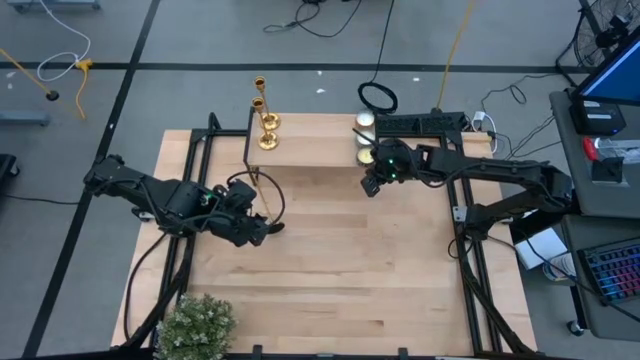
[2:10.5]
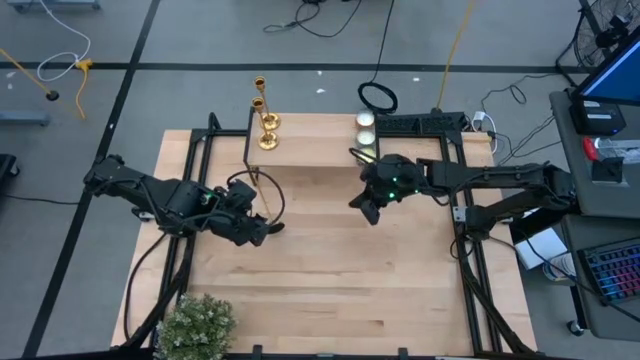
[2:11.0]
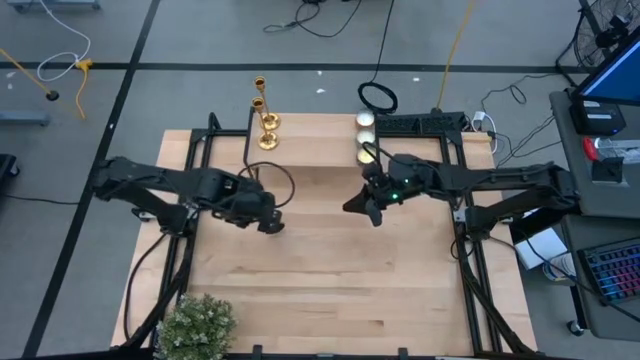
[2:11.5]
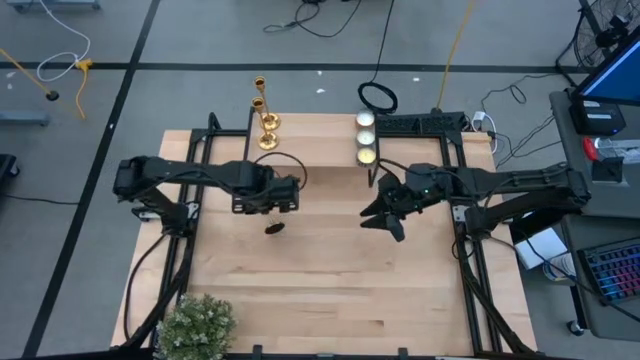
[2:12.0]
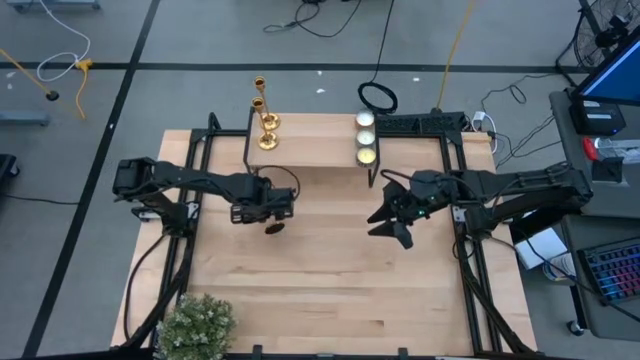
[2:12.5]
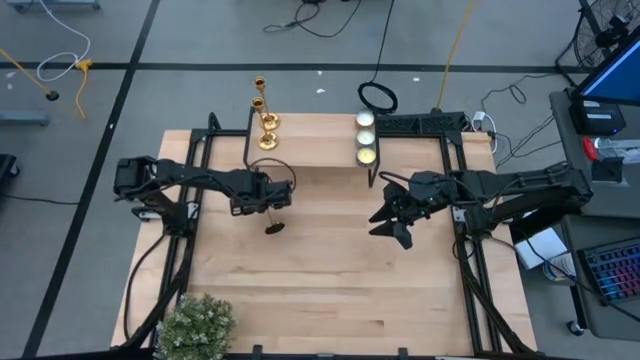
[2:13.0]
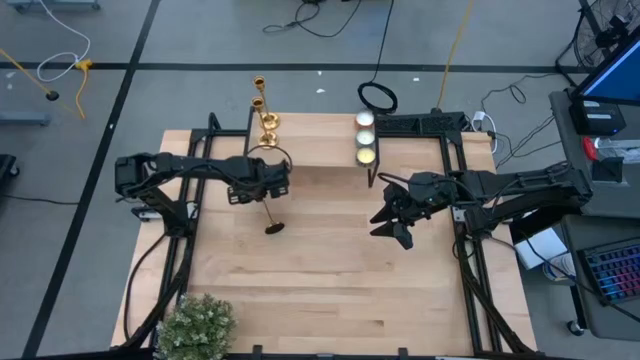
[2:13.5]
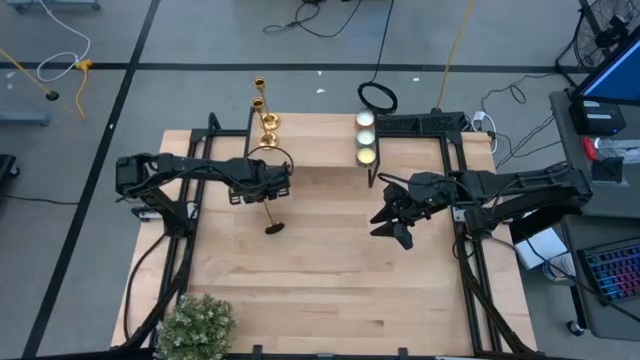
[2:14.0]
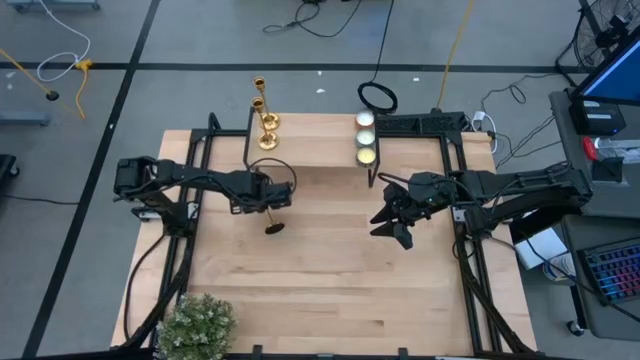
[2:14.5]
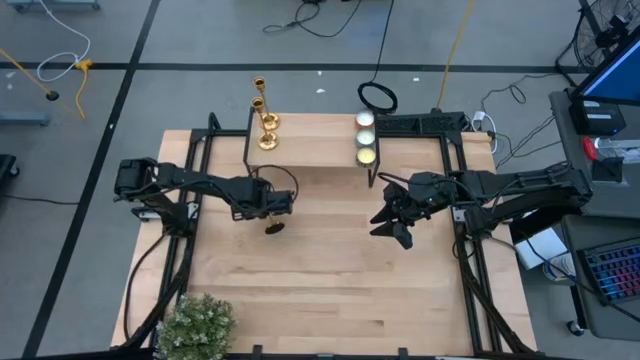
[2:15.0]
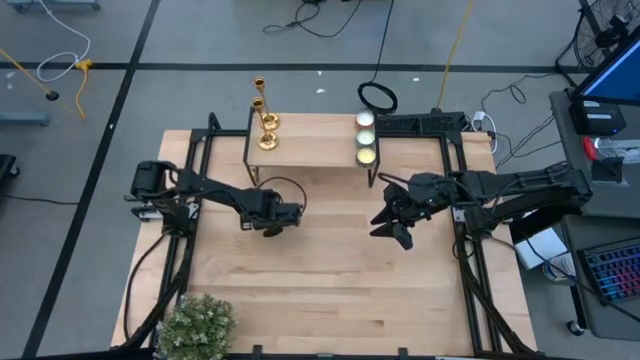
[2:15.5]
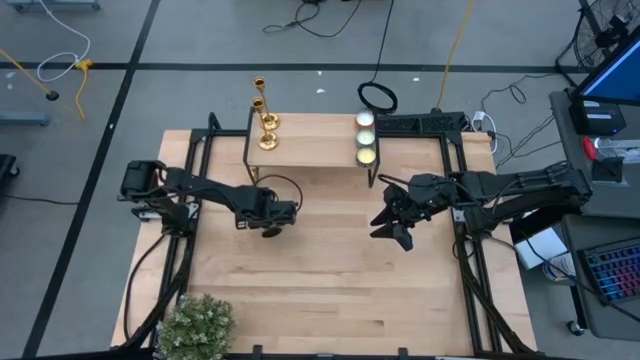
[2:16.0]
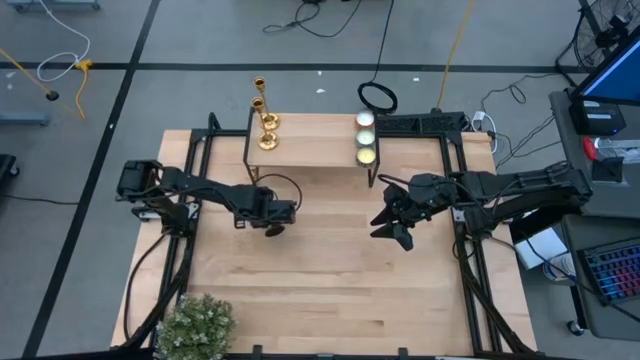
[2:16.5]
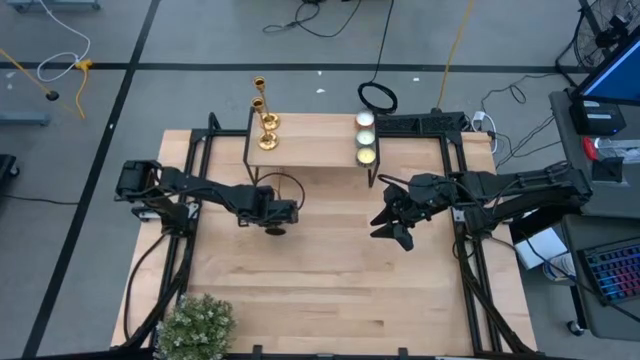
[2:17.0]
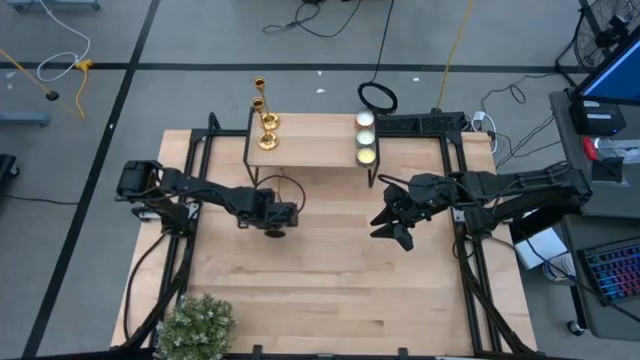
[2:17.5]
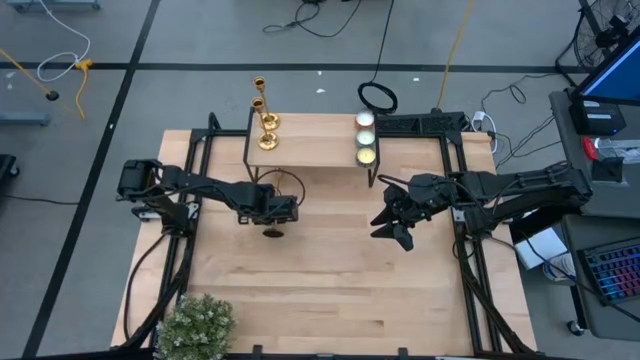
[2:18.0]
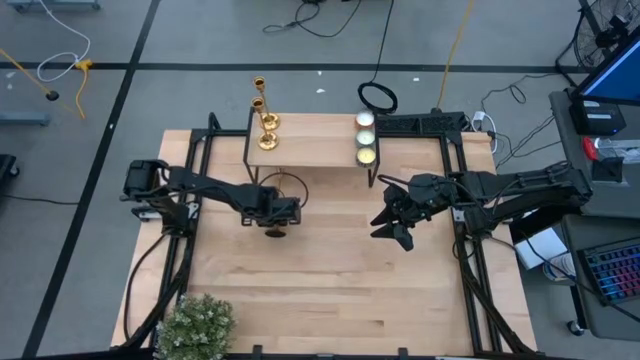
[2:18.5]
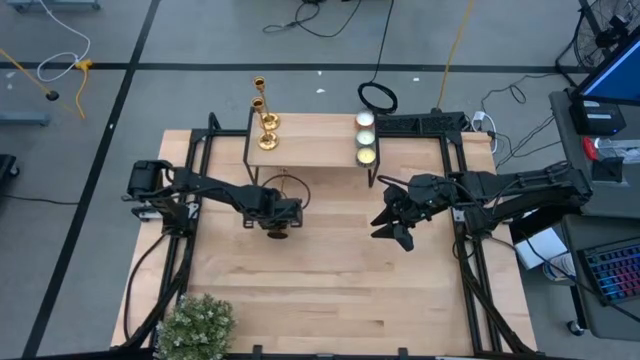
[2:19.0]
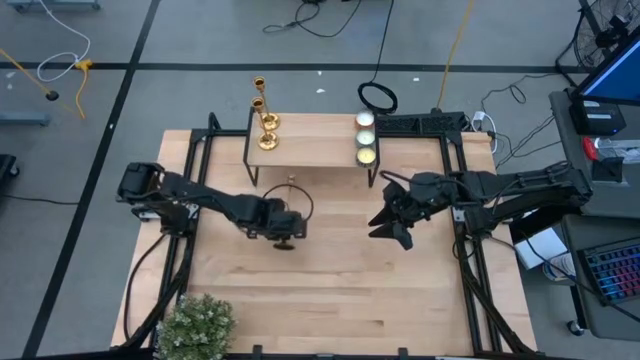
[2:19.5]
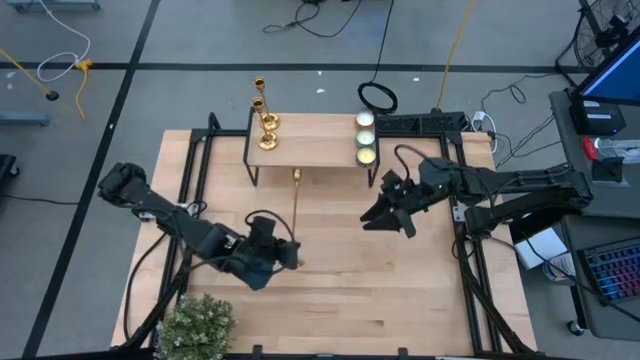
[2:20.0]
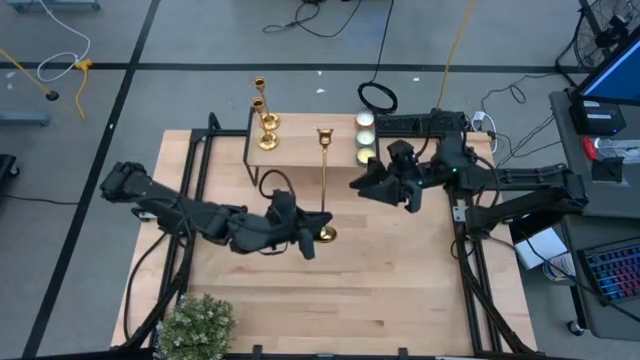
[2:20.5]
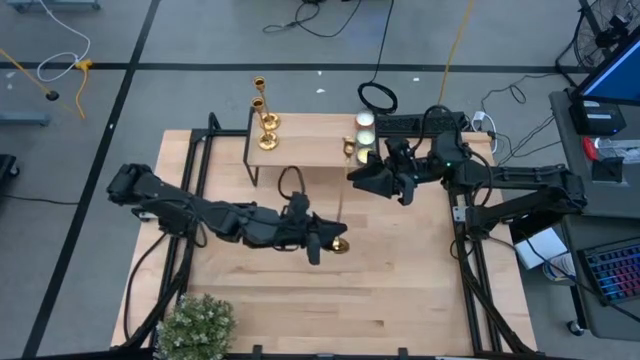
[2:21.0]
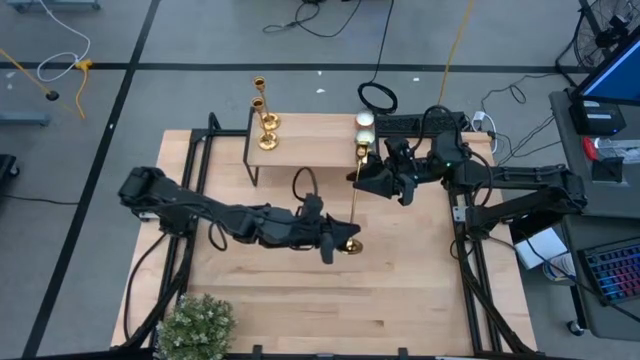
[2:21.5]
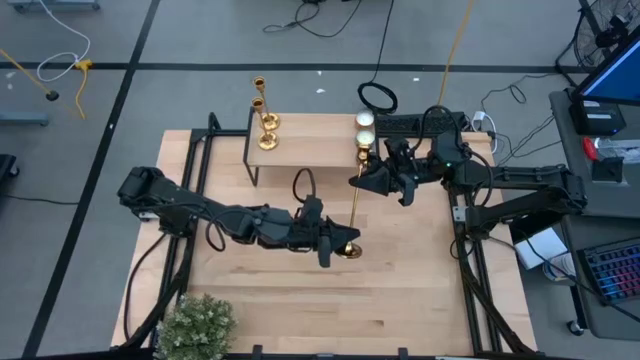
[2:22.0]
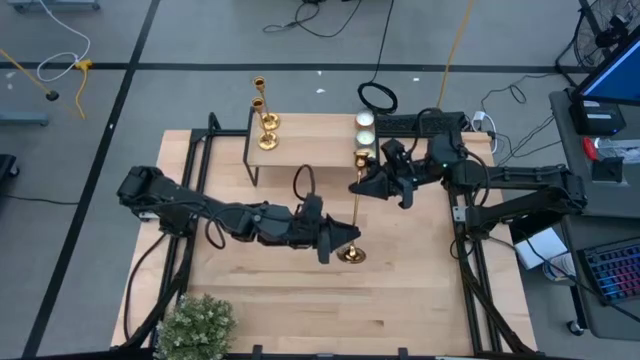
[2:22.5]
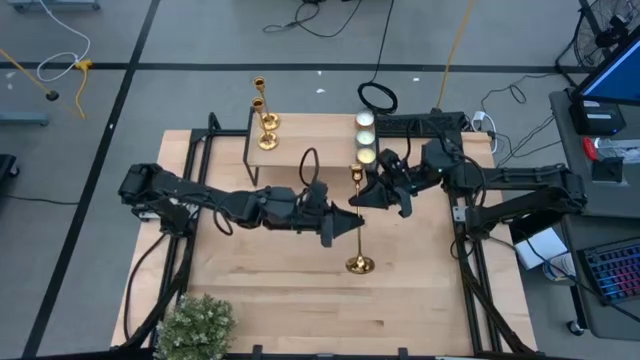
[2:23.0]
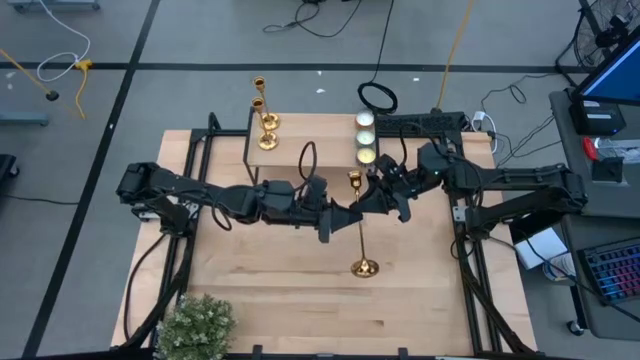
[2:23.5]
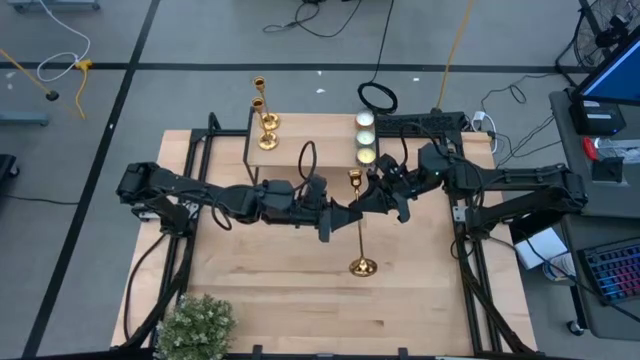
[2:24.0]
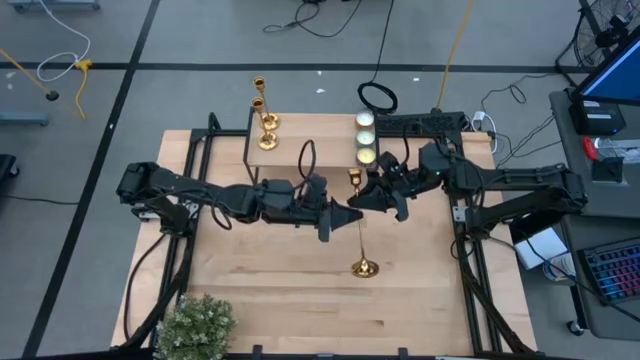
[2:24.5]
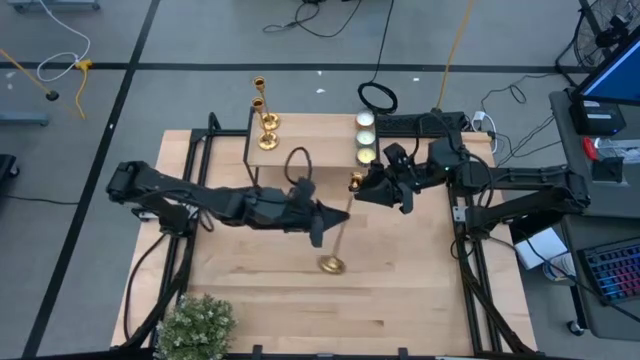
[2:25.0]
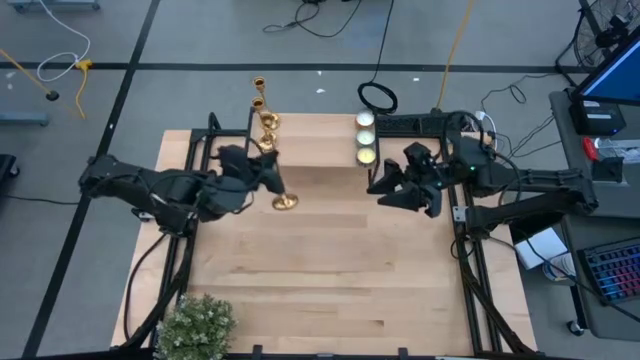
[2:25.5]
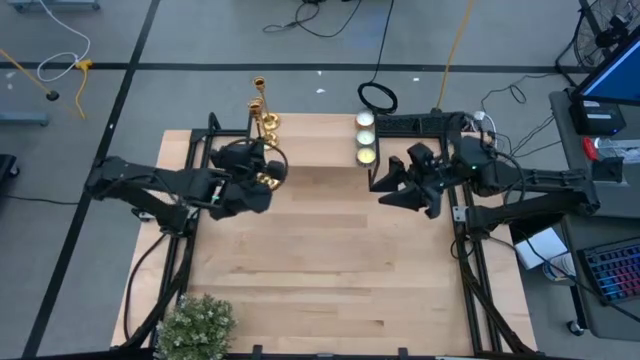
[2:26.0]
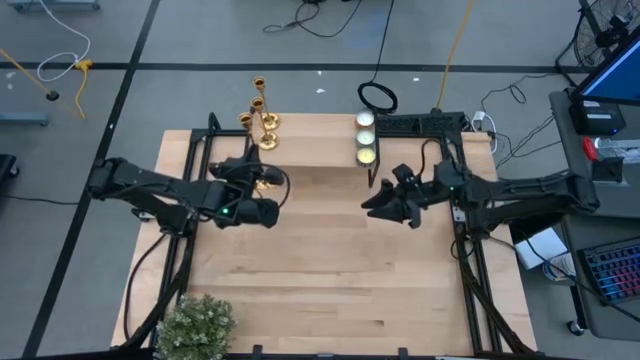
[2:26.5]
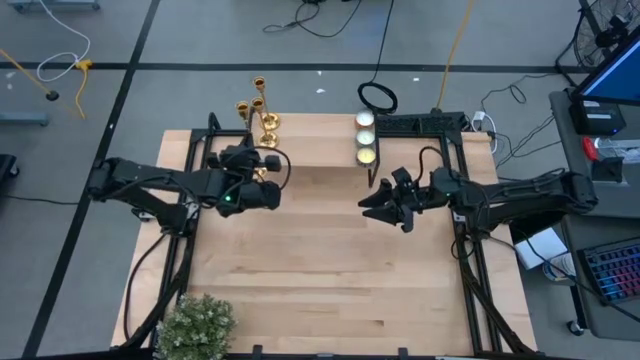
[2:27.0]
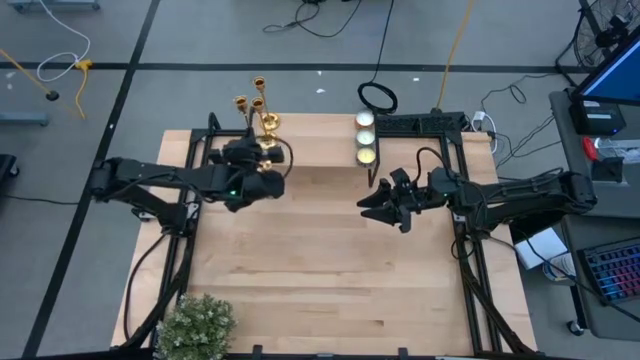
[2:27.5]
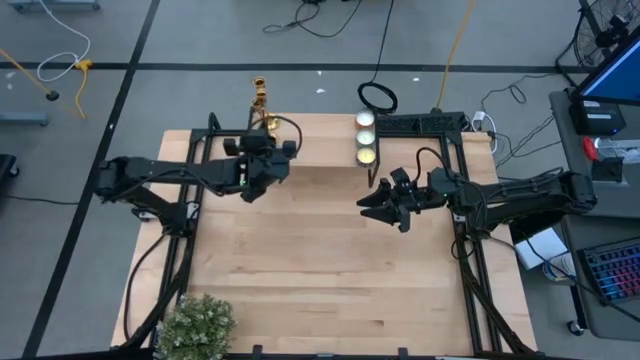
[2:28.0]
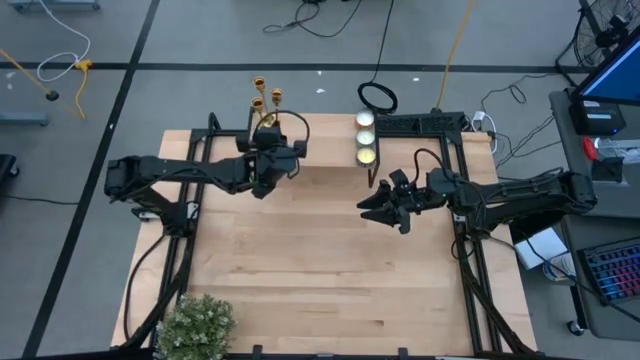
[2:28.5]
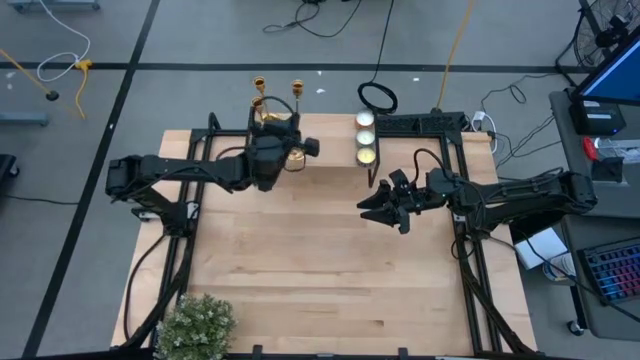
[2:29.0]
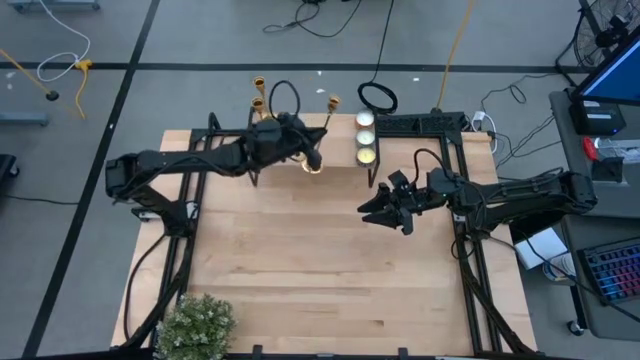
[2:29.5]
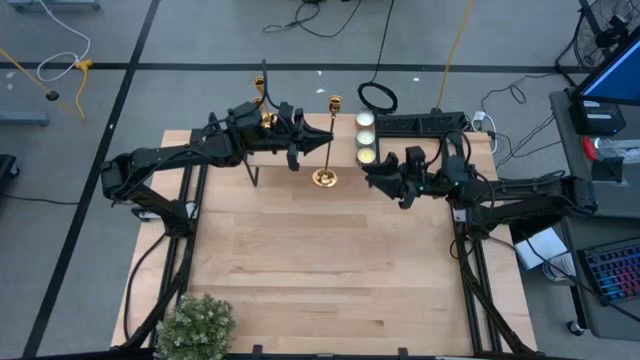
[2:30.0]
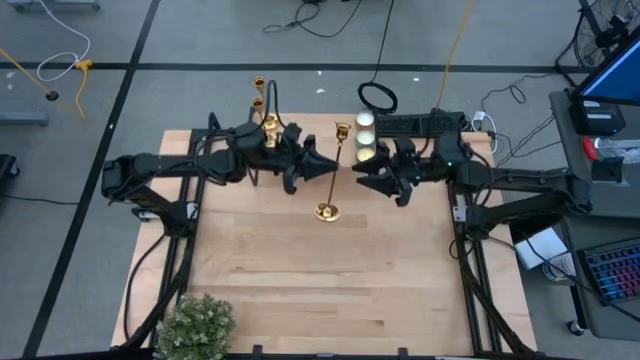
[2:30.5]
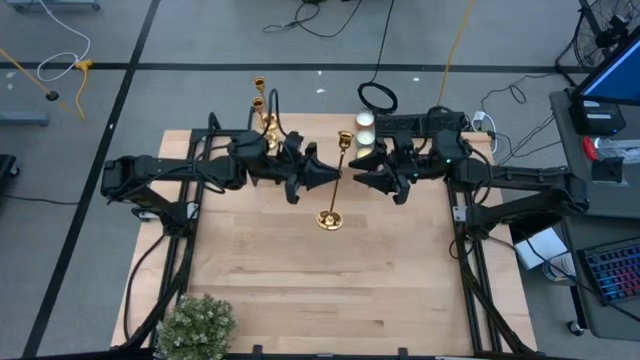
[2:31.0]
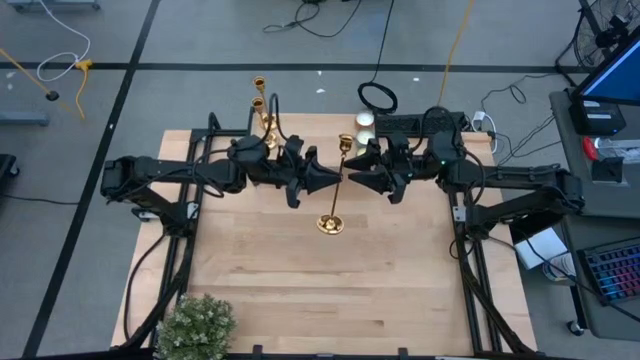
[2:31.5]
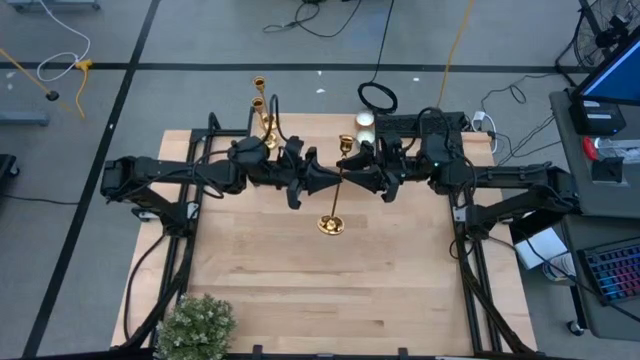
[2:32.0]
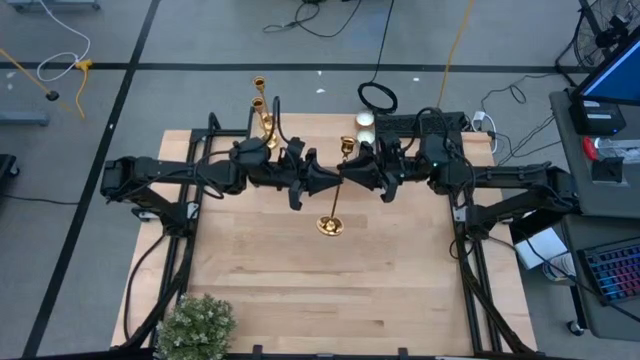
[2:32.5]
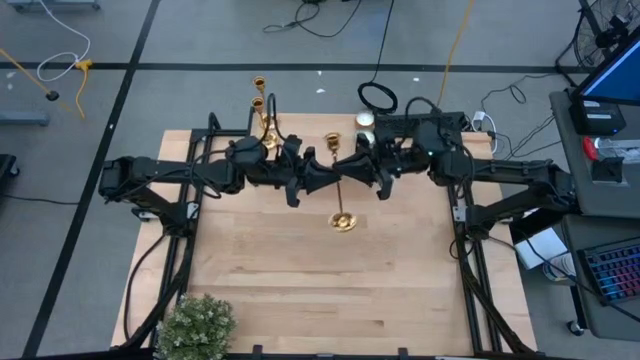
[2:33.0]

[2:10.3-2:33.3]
Task: Pick & Place candle stick holders
Put the gold candle holder on the shelf aligned with the other gold candle holders
